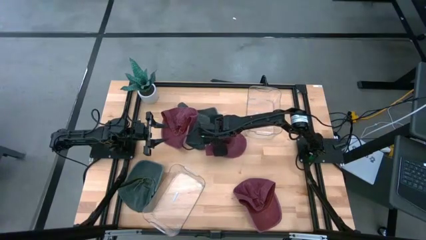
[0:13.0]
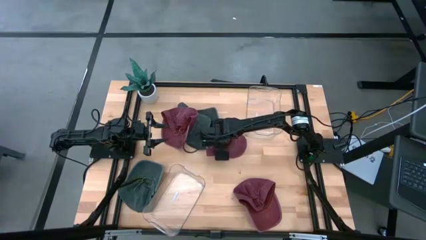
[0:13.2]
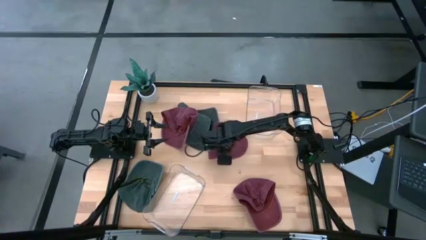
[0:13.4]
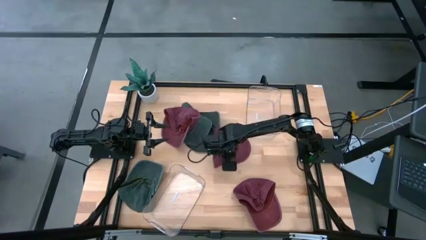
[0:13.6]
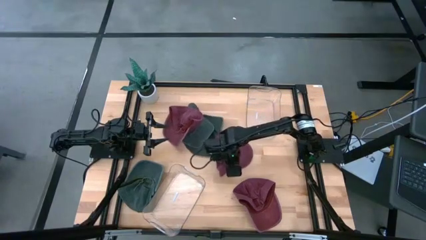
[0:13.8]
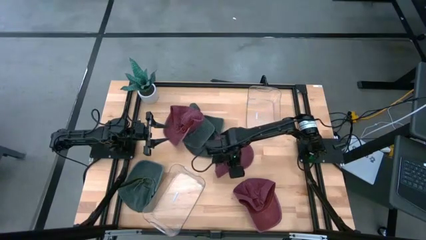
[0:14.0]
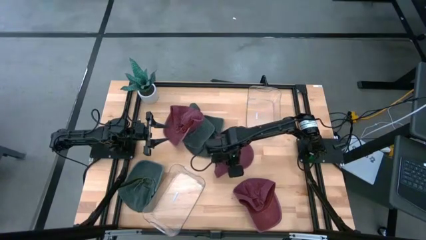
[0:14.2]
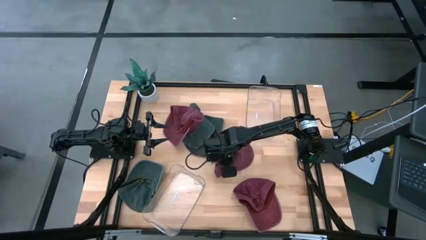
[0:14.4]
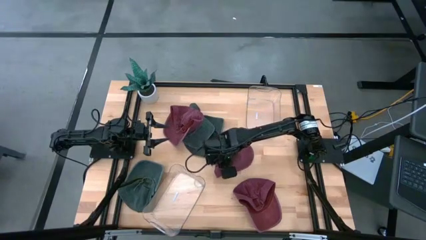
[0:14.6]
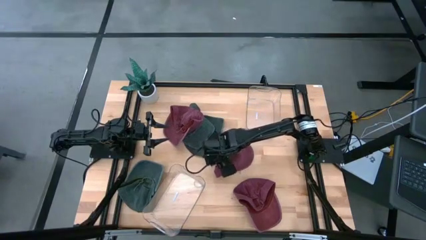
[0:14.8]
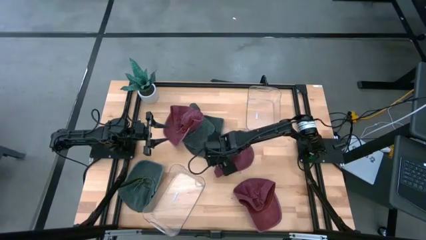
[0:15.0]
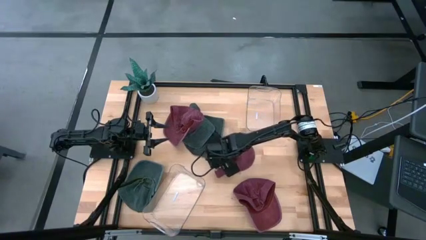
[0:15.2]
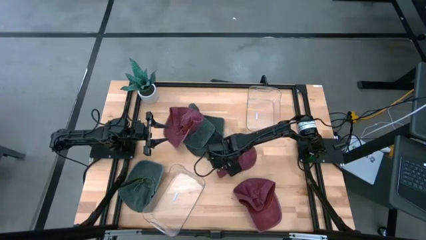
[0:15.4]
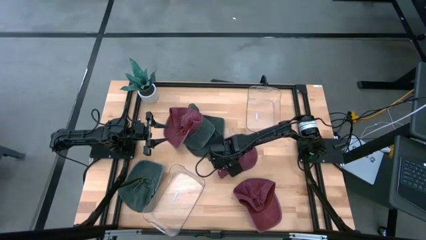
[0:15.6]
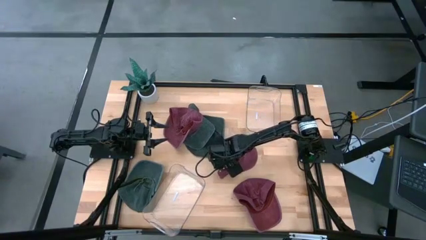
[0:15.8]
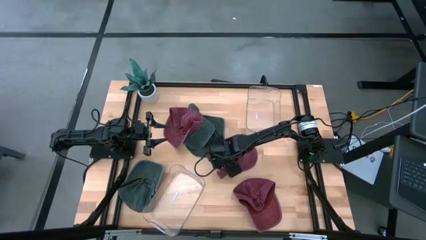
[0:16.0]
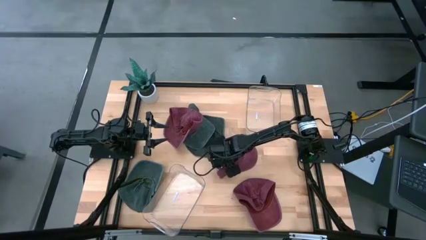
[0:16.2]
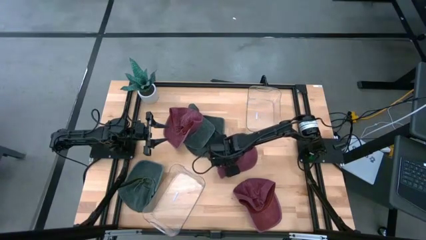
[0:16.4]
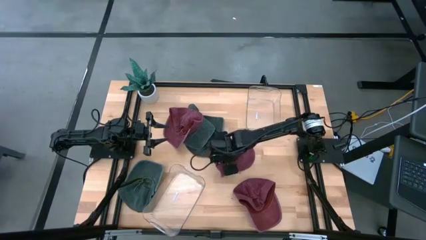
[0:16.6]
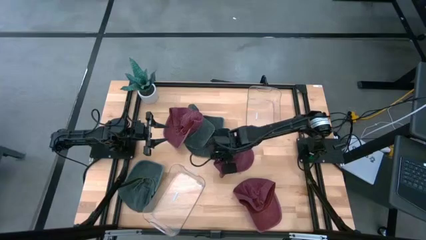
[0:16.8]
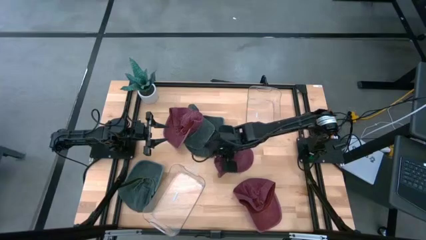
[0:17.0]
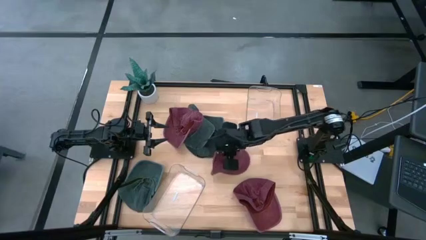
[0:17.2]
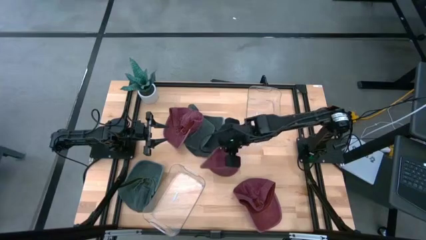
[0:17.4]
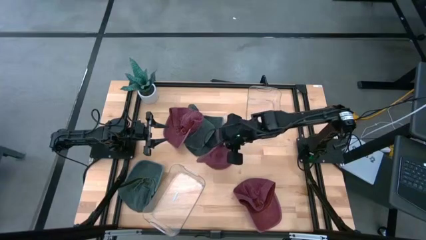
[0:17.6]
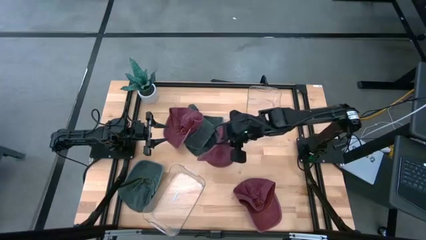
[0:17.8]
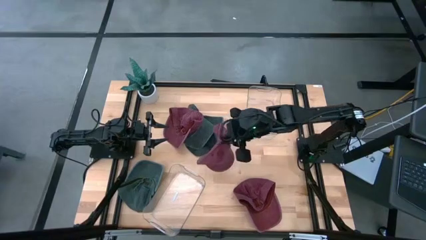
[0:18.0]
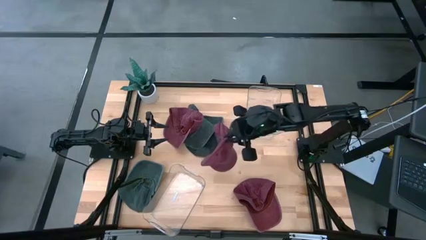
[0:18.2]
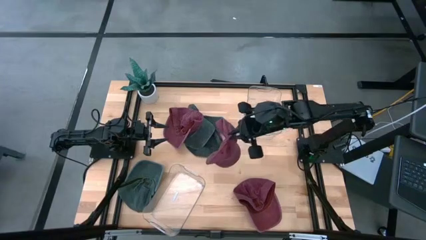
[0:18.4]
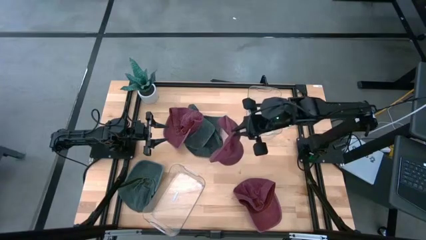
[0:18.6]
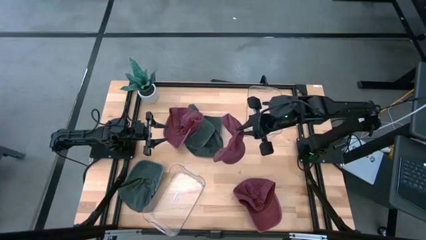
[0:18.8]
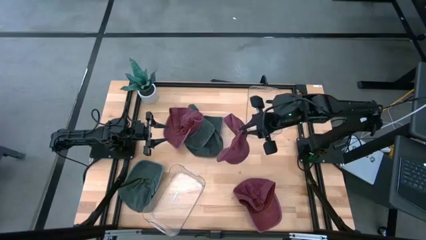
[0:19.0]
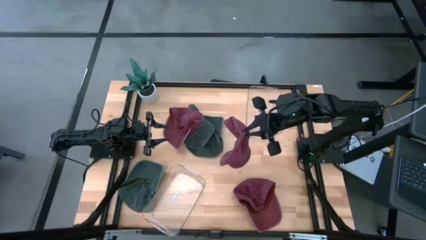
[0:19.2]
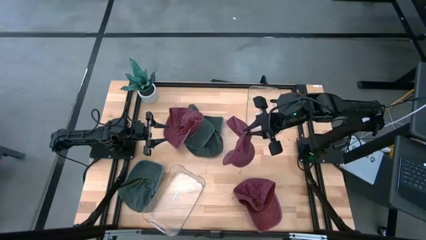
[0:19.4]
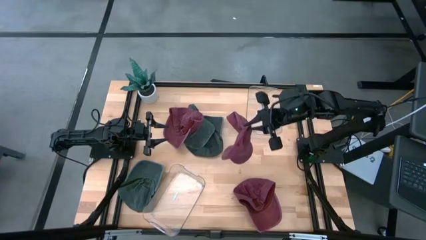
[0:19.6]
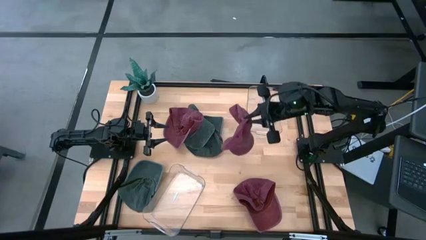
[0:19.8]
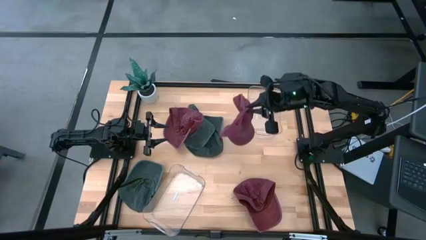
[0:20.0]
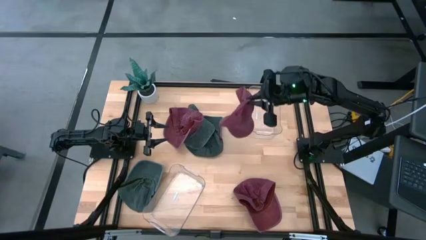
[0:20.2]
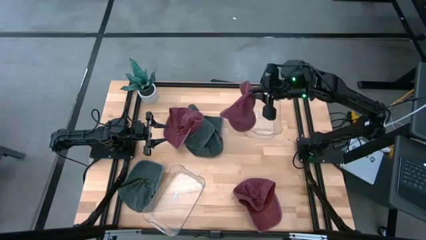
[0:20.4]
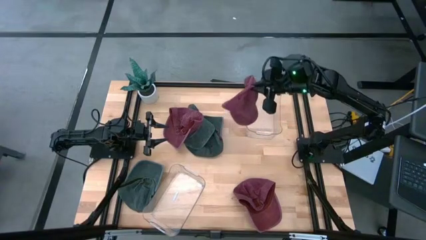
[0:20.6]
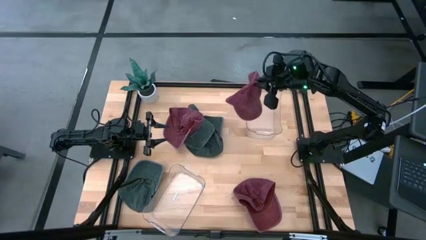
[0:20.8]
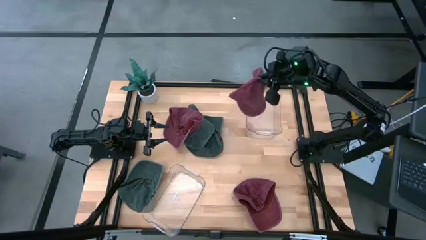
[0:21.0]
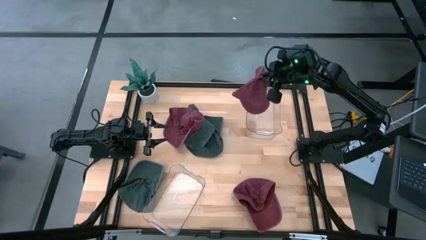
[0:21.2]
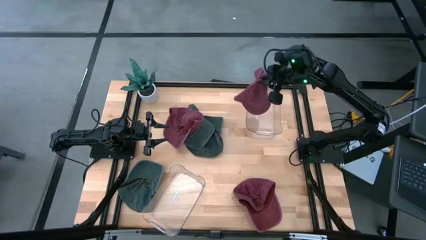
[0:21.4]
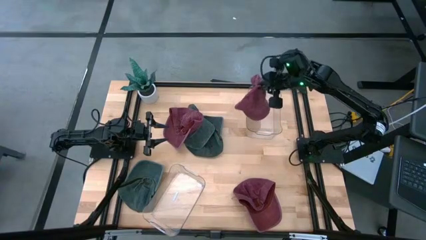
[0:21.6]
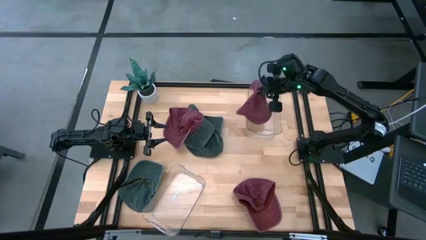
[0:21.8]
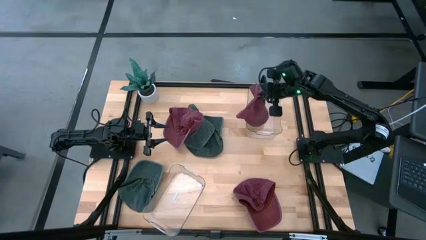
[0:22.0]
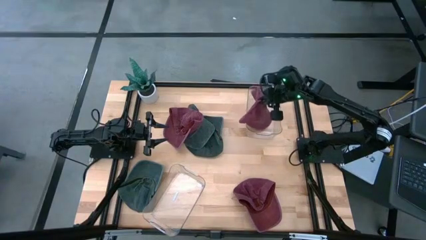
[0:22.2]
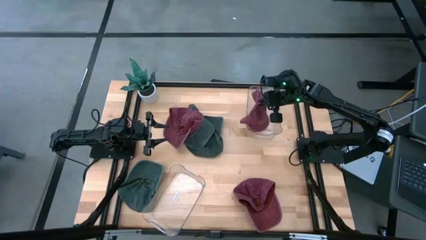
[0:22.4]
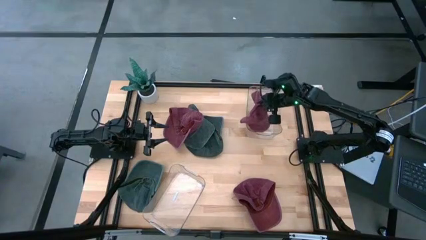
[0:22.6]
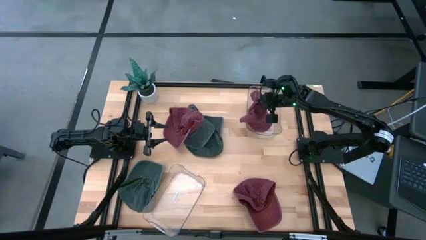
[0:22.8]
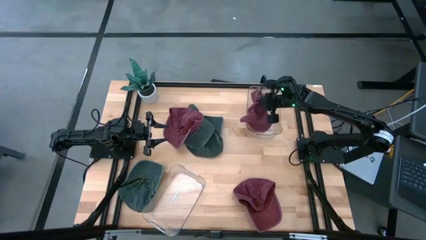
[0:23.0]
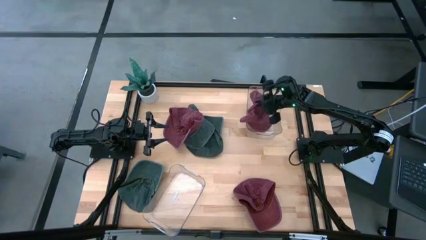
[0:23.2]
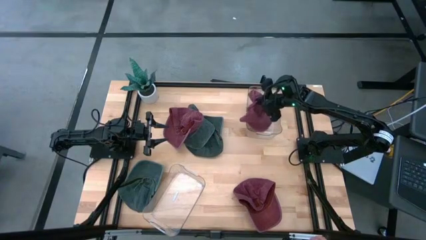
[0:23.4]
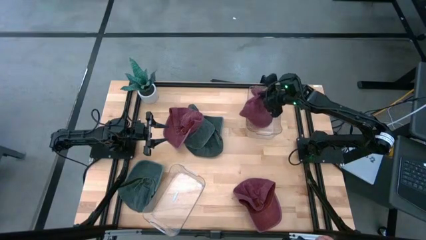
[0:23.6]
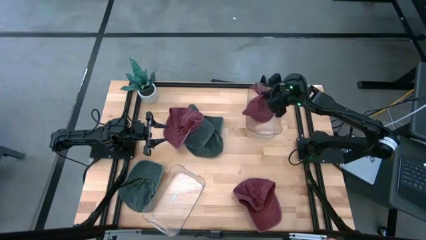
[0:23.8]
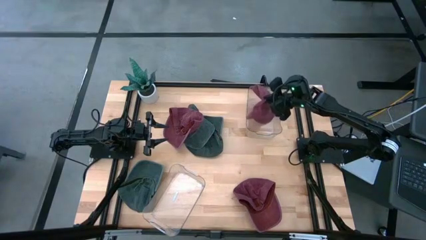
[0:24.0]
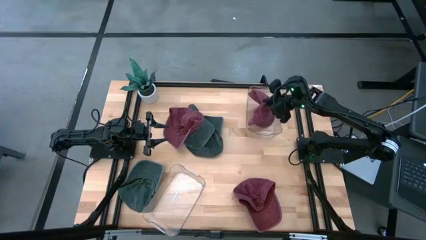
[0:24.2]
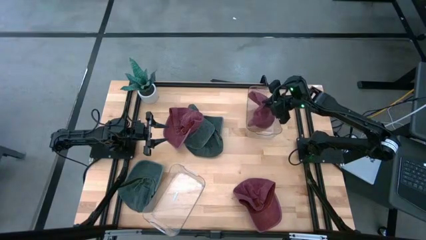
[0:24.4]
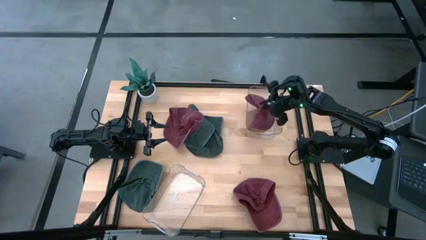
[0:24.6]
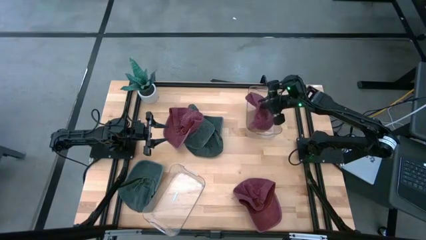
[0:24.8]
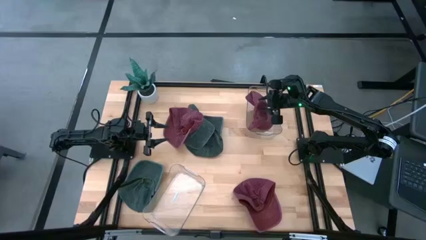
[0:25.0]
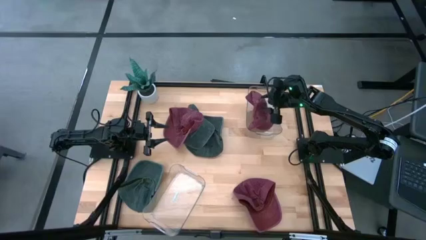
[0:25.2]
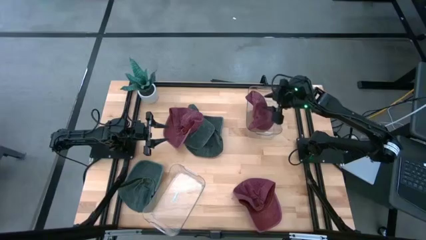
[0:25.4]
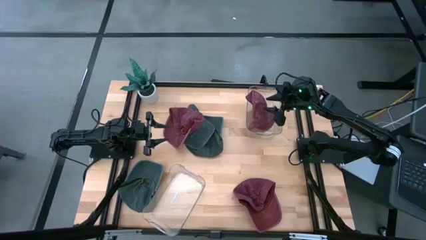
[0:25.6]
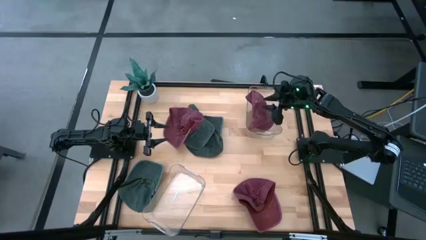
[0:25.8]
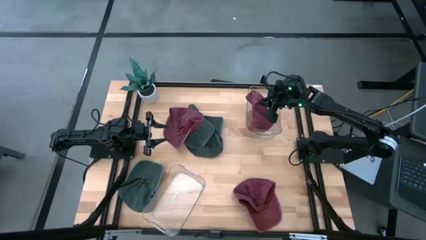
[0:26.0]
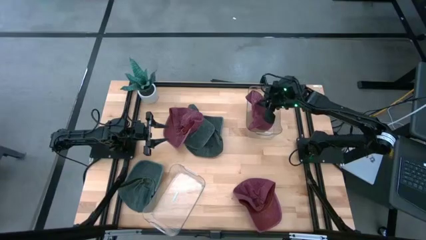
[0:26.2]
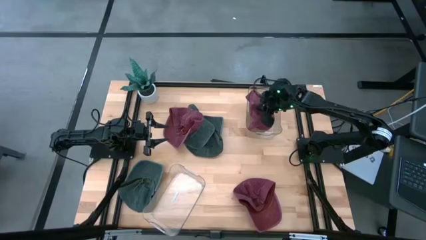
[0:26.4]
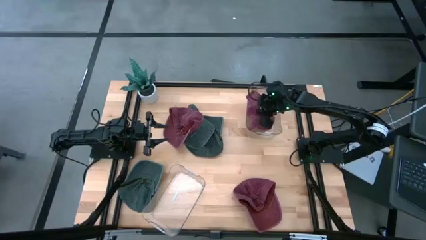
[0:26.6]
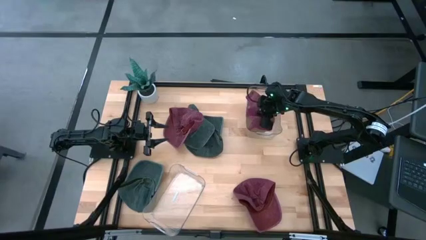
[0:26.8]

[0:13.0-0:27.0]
Task: Pick & Place hat
Put the middle red cap into the top transparent bin

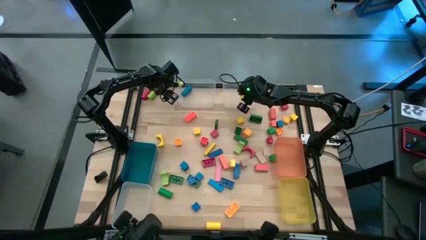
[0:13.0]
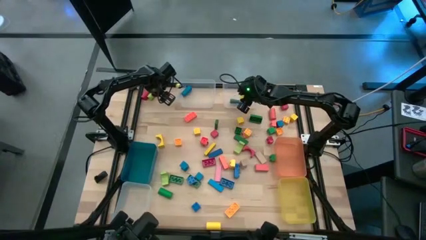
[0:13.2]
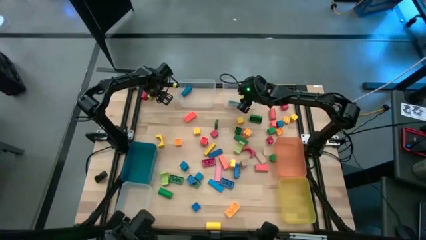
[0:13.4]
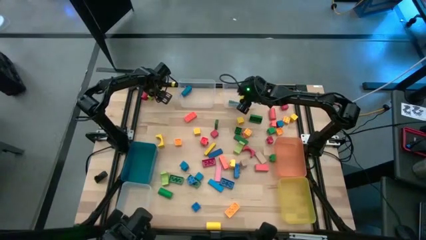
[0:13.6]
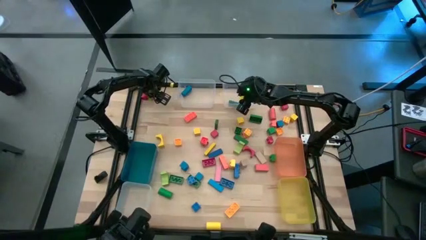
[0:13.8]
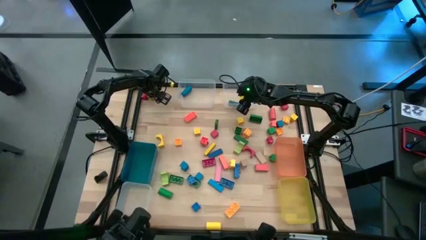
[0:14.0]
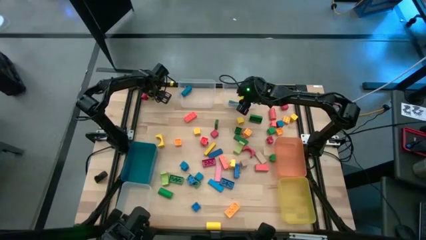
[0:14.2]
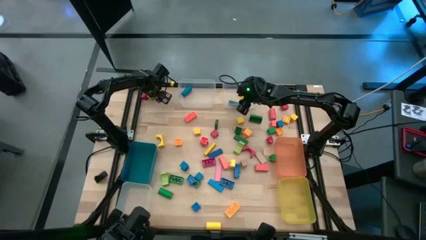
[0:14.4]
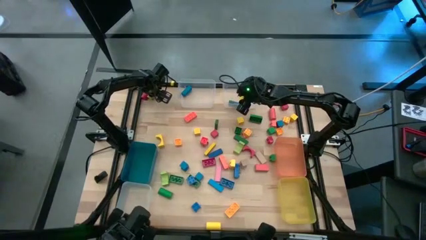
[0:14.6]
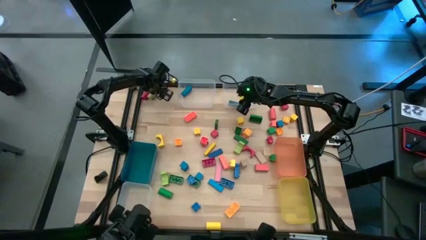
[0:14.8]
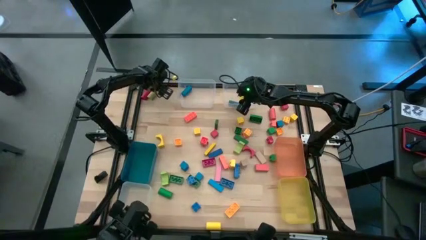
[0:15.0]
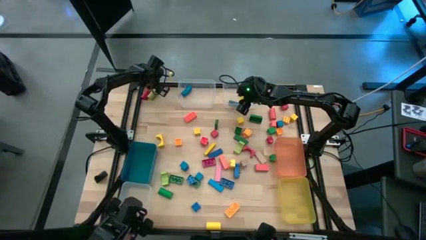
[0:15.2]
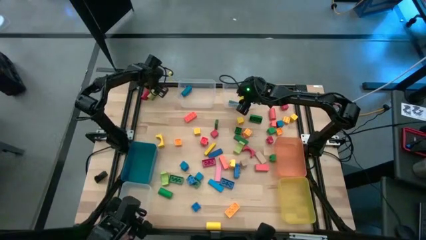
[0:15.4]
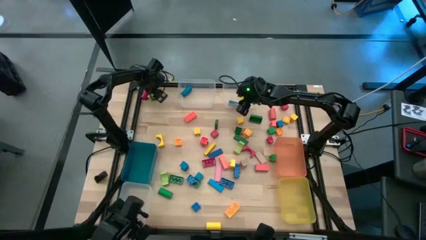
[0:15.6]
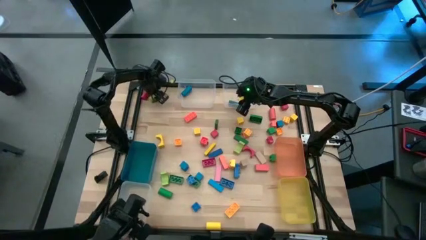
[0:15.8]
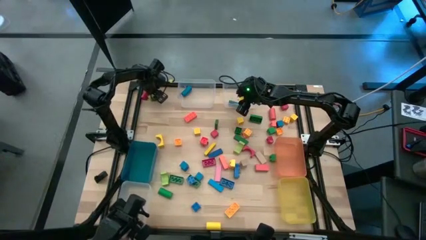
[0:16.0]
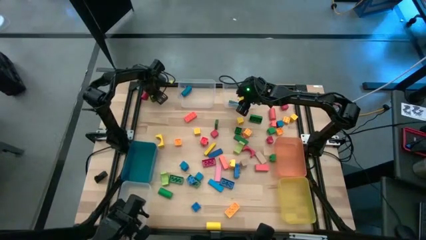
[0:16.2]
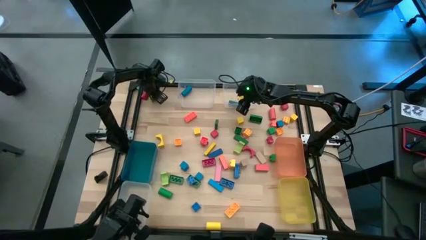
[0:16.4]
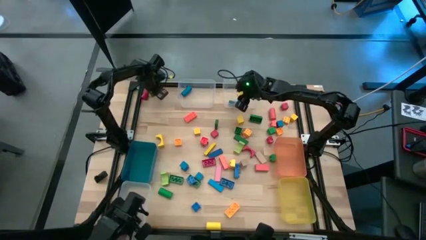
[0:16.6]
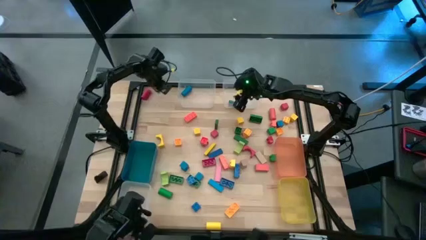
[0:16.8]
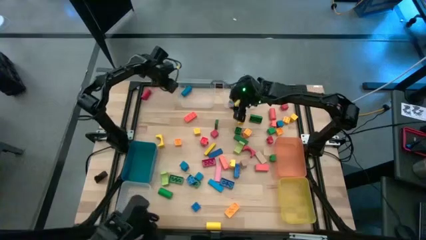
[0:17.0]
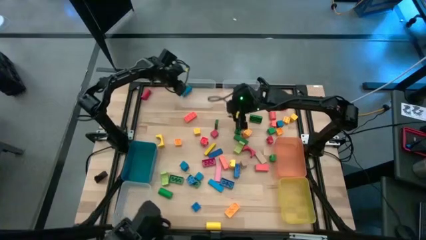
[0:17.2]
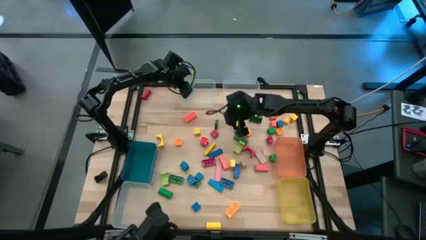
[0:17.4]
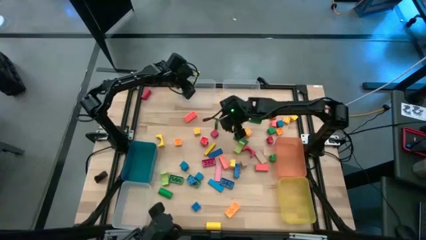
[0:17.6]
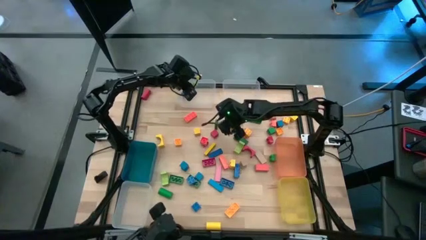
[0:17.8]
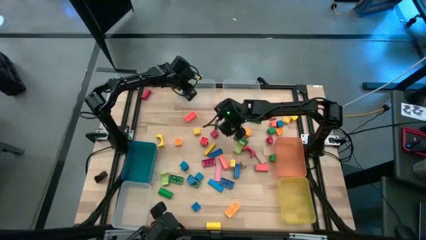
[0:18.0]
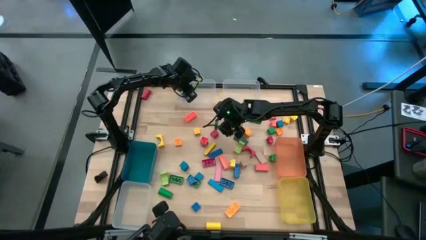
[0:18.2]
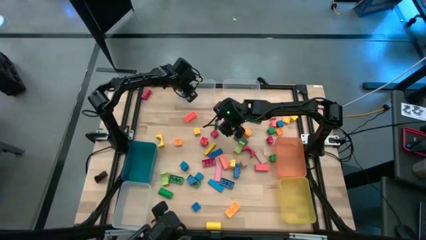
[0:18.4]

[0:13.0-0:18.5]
Task: Sort blocks by size
Put the light green block into the top left transparent bin
